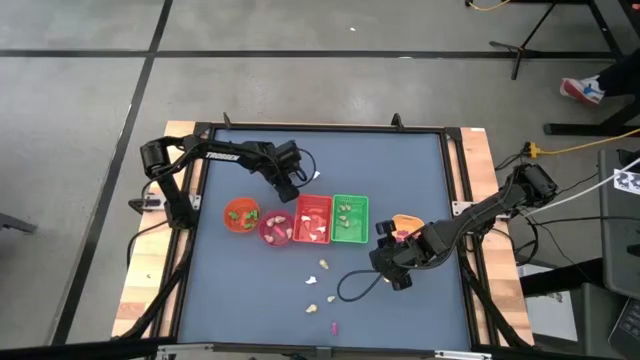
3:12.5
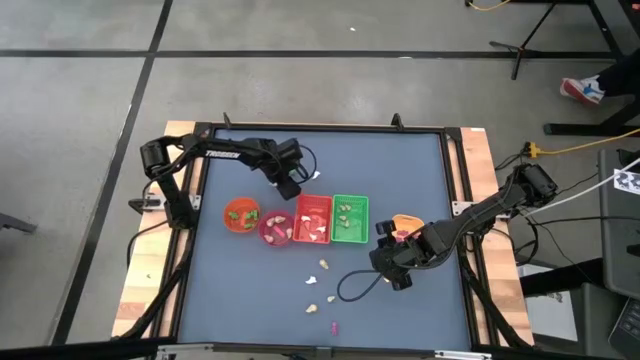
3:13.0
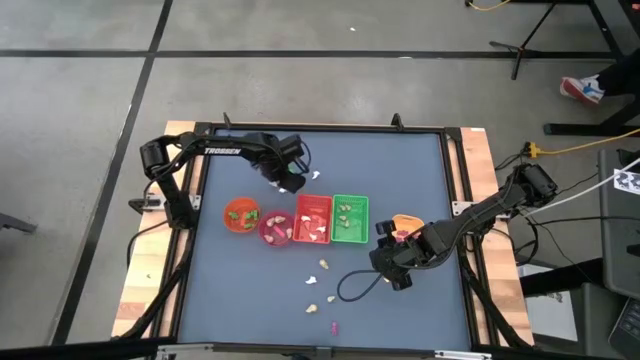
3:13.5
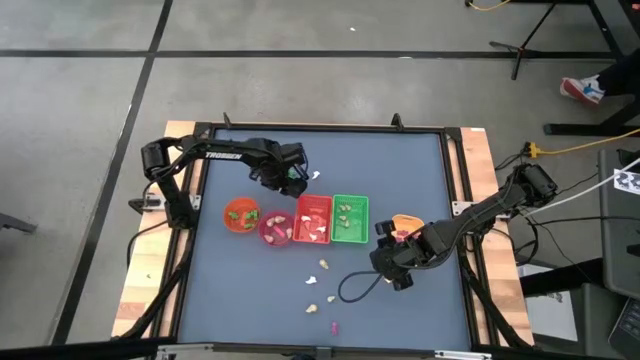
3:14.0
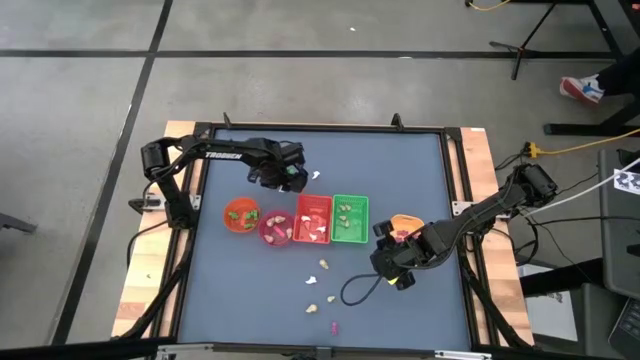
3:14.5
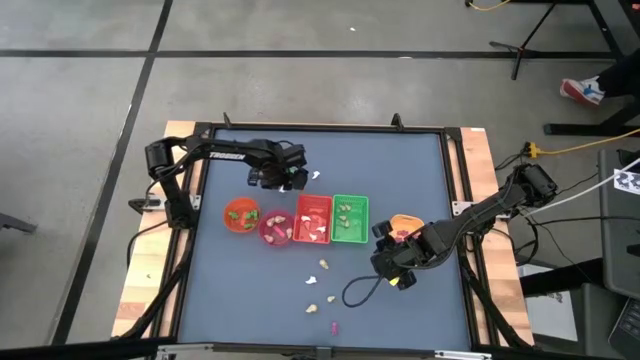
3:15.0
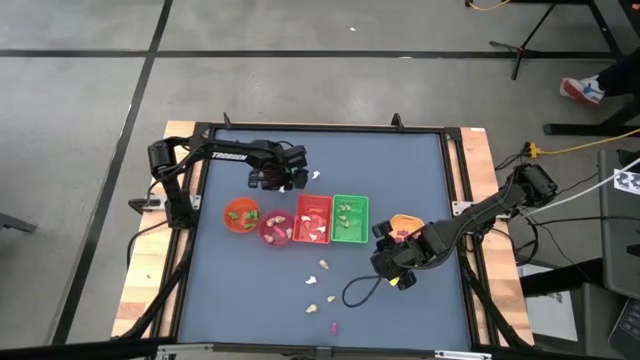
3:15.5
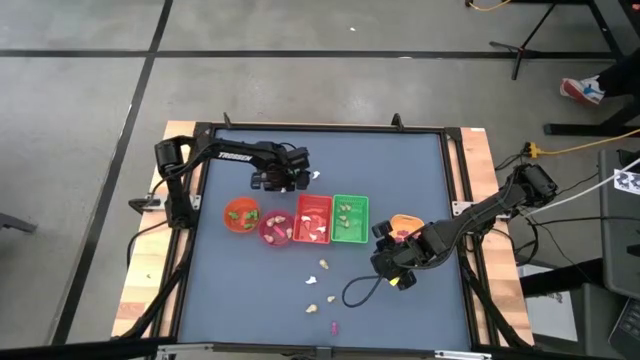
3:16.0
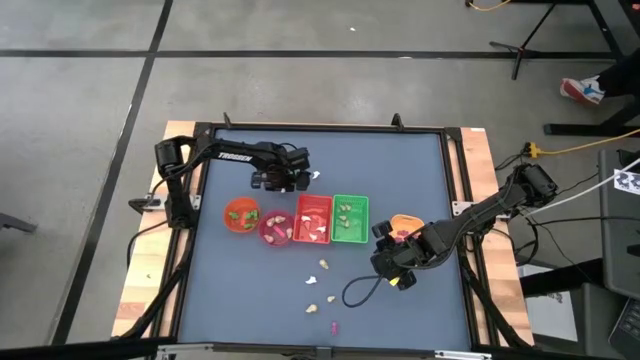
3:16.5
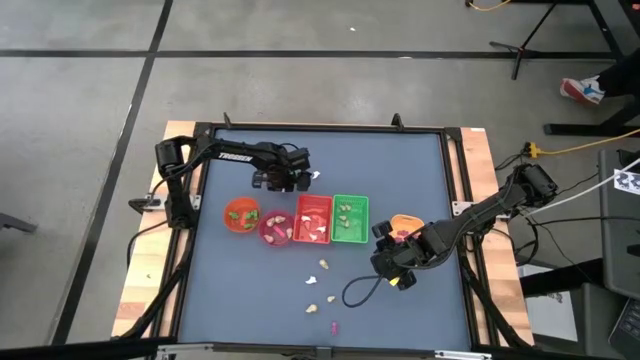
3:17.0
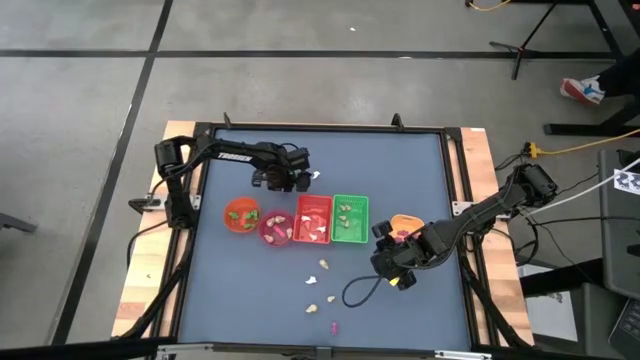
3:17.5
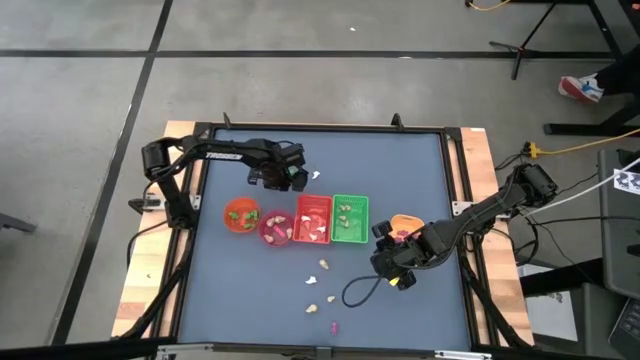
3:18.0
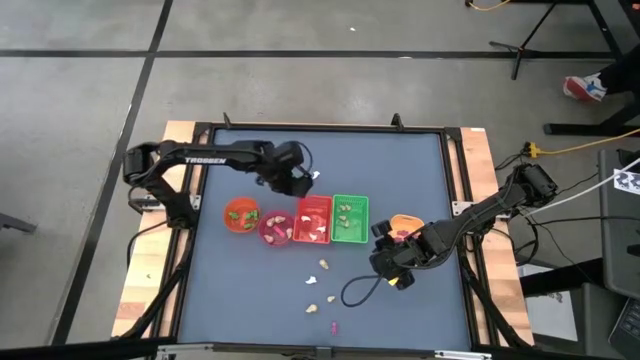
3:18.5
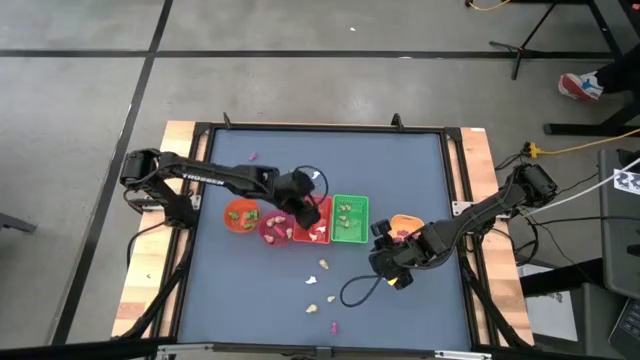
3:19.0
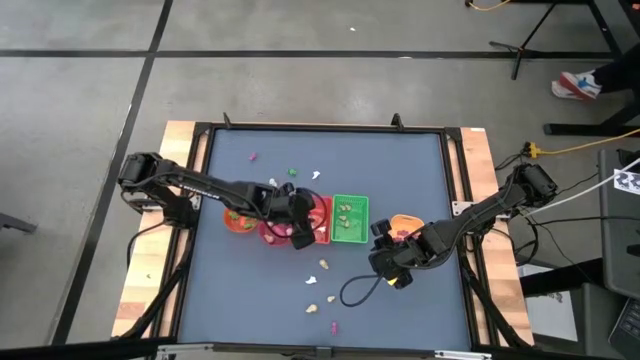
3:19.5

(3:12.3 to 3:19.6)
Task: Sort Halloween decoration
Put the white ghost toy into the red bin

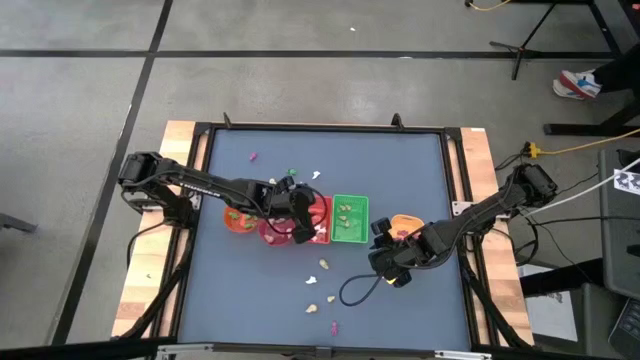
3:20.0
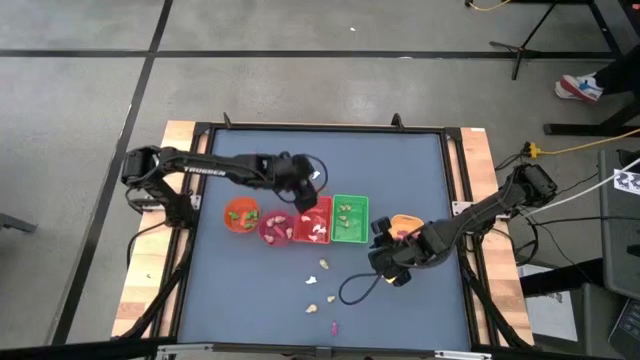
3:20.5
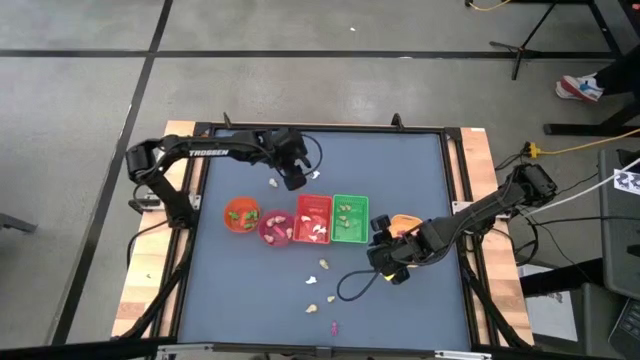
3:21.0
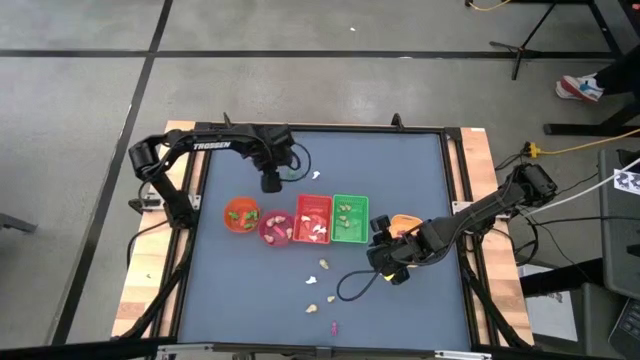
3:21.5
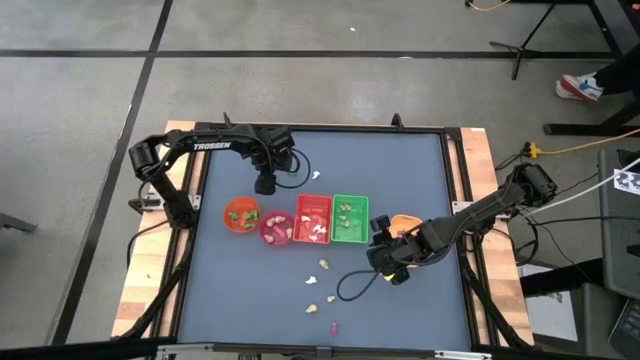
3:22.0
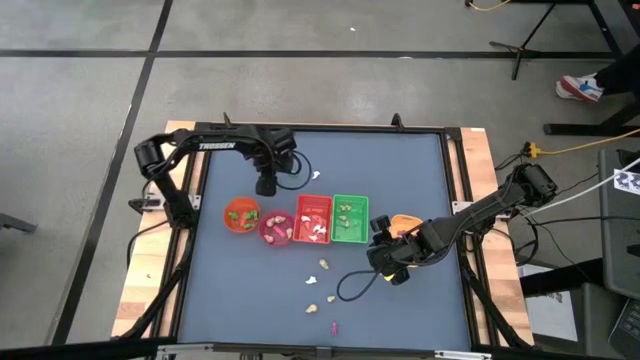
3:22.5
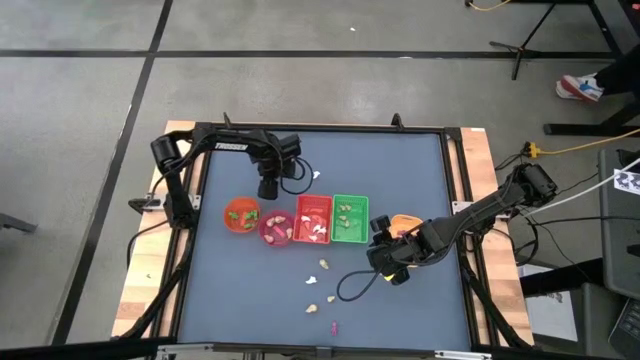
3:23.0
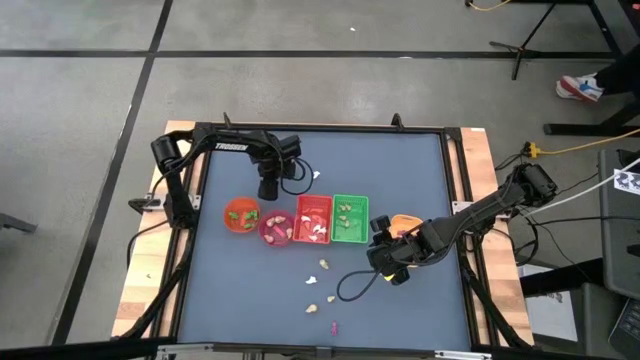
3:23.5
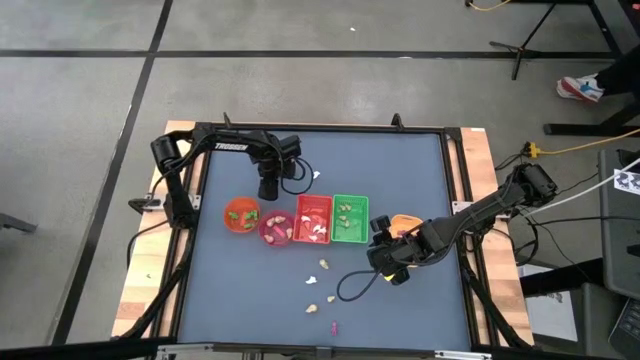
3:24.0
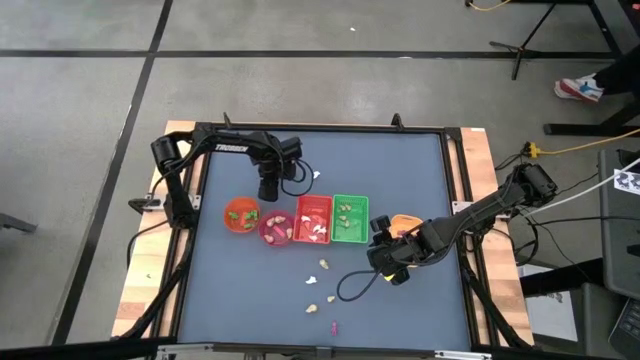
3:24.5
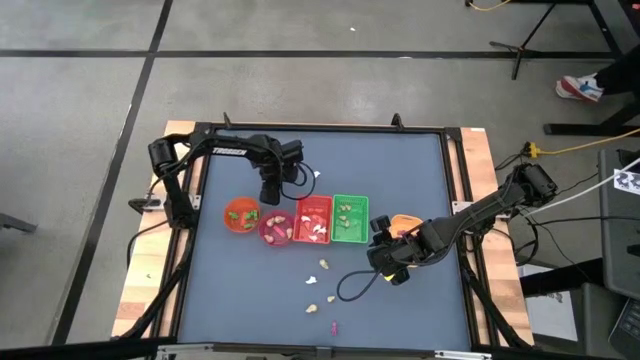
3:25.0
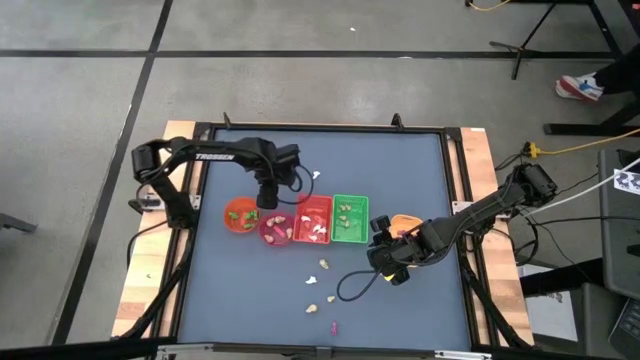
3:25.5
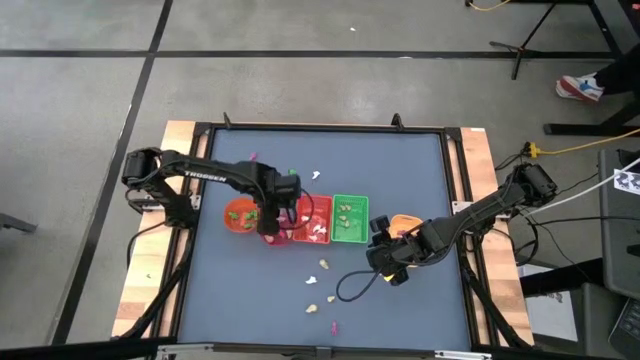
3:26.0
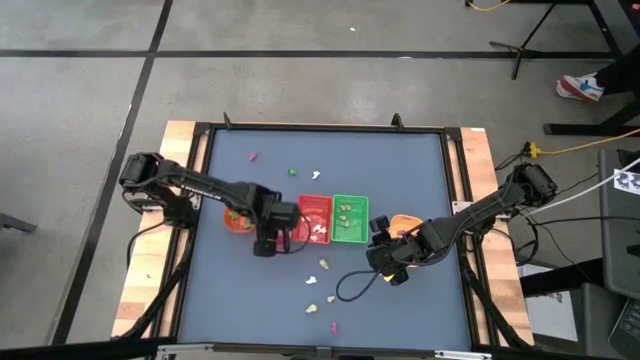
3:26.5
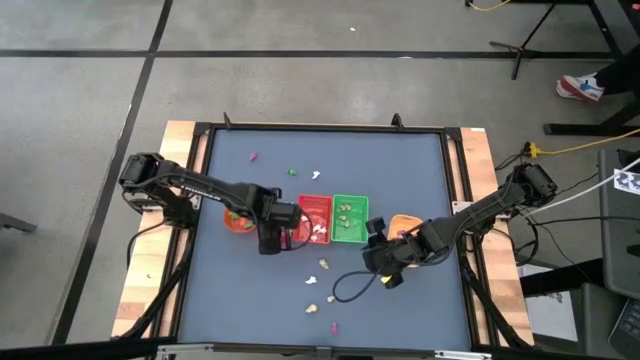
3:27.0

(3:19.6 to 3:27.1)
Put the yellow skull toy into the pink bowl

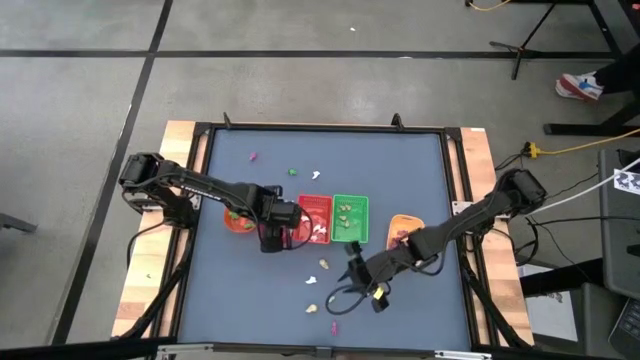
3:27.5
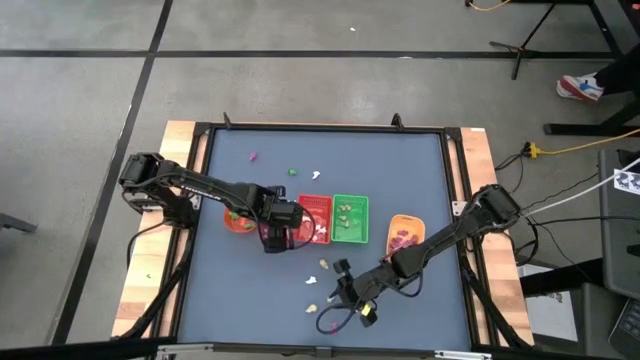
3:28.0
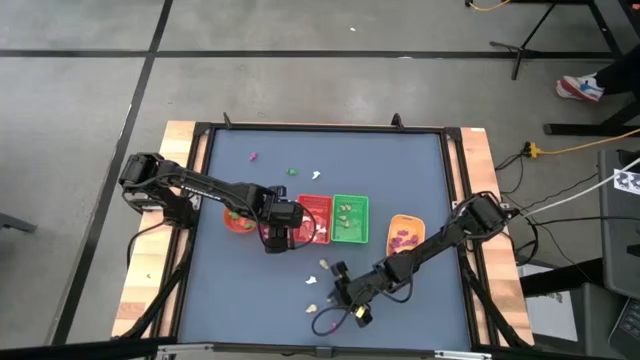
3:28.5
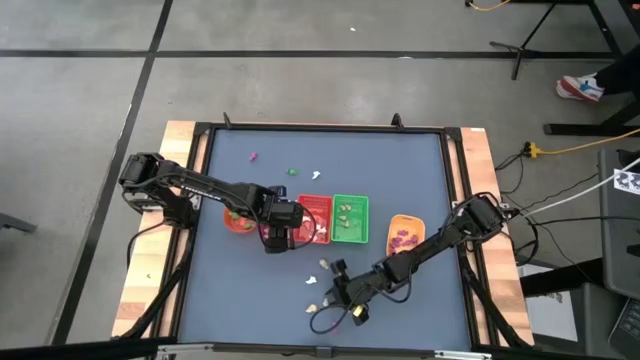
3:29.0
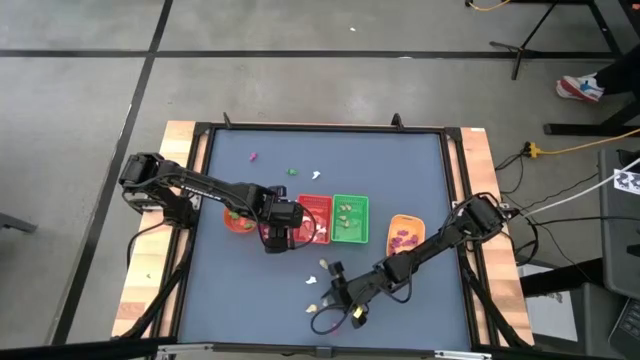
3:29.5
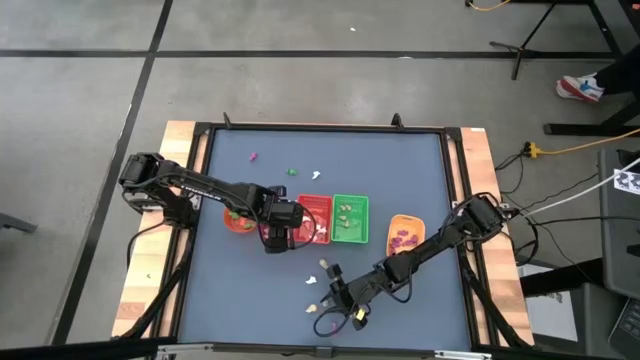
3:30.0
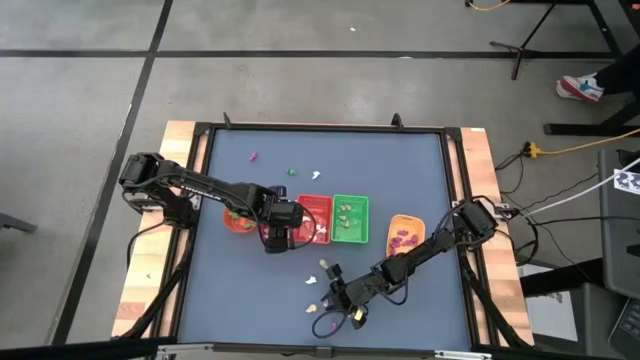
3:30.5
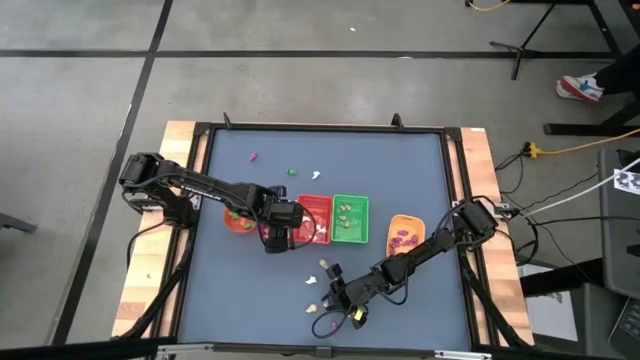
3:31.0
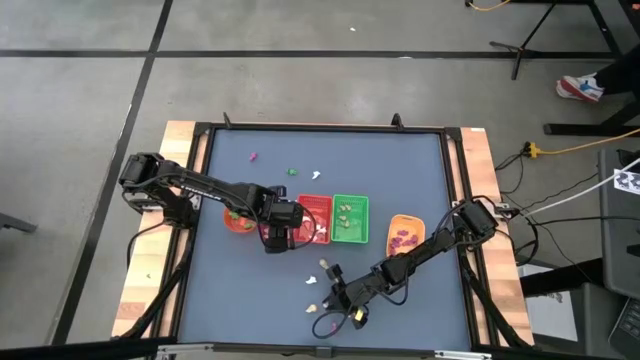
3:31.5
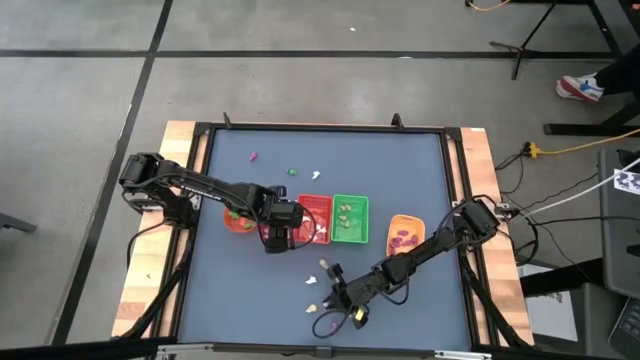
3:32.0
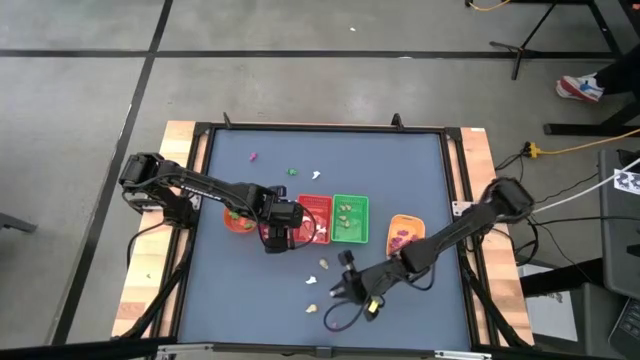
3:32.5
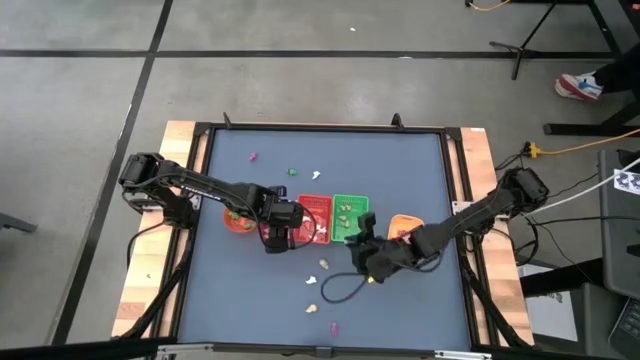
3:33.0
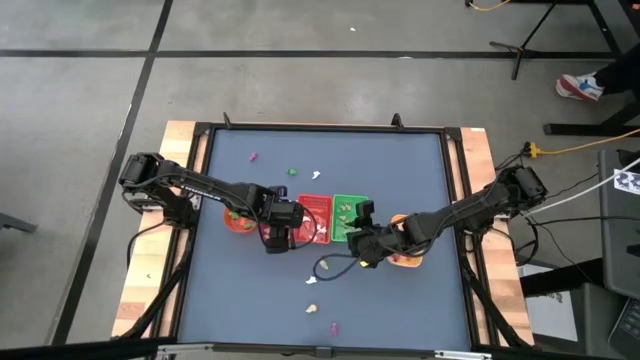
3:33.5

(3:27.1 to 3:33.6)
Put the yellow skull toy into the green bin
